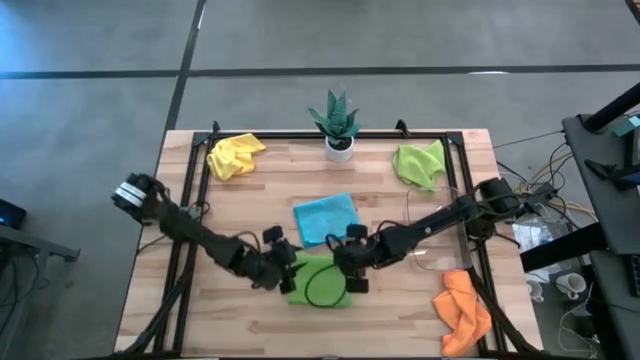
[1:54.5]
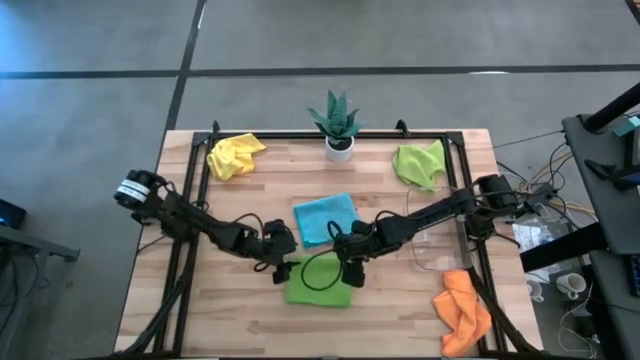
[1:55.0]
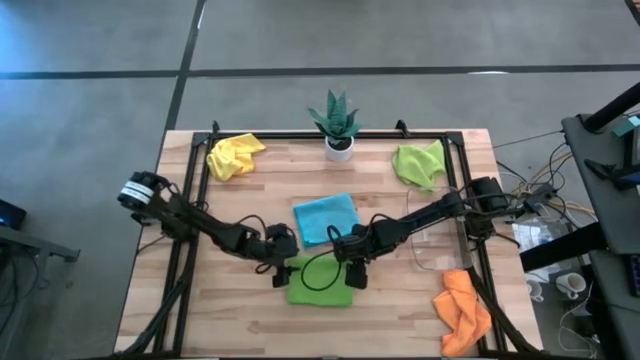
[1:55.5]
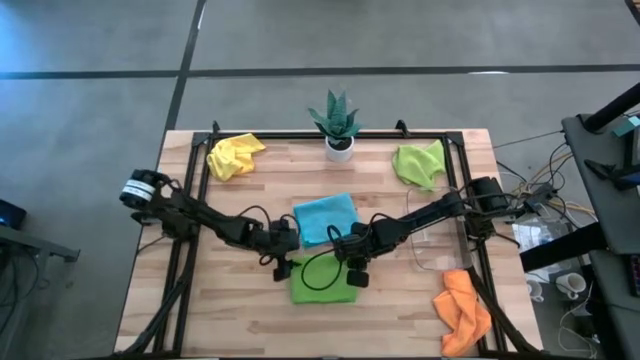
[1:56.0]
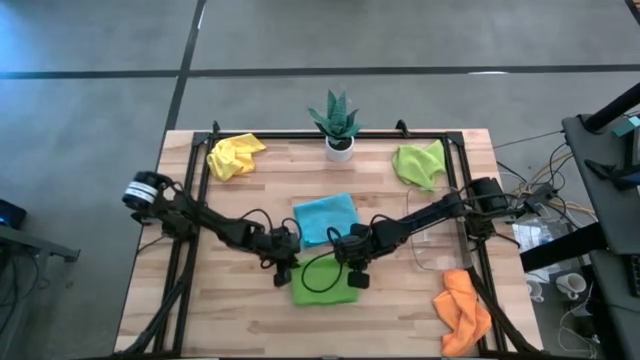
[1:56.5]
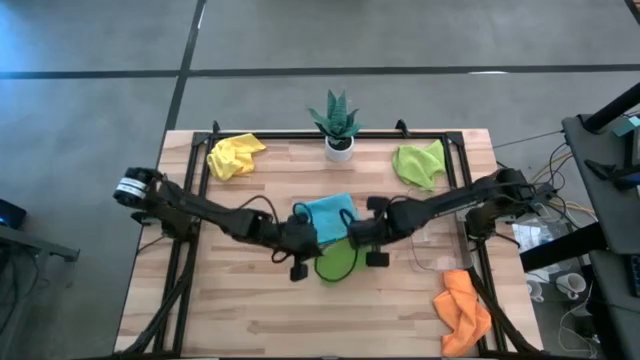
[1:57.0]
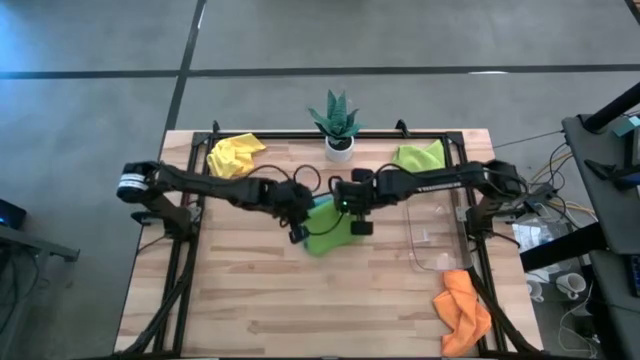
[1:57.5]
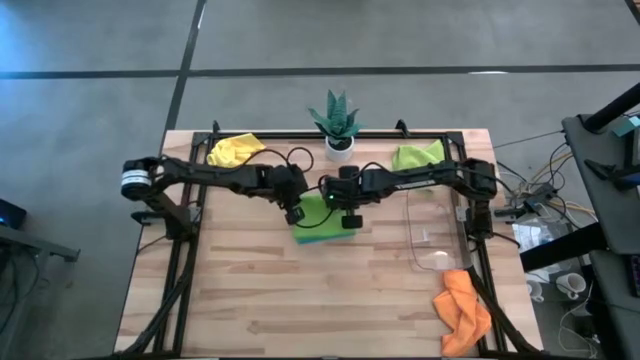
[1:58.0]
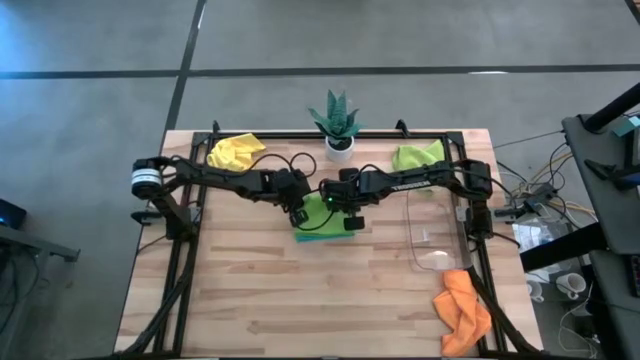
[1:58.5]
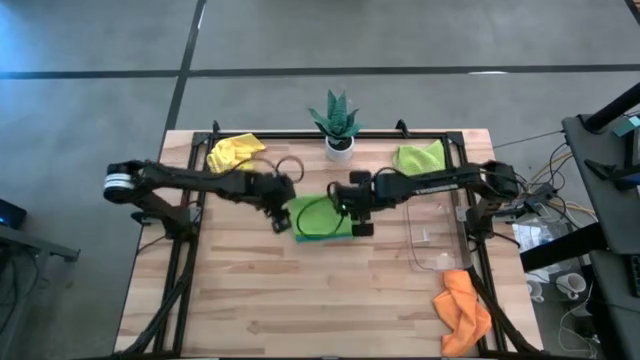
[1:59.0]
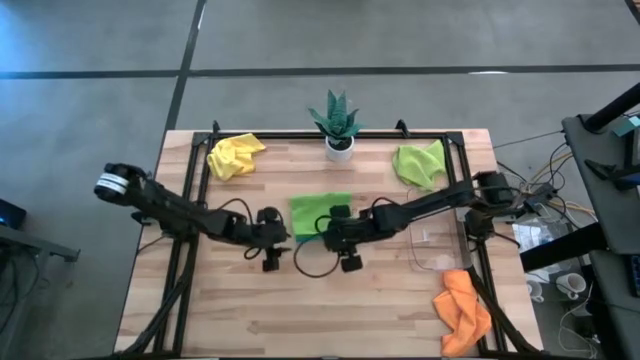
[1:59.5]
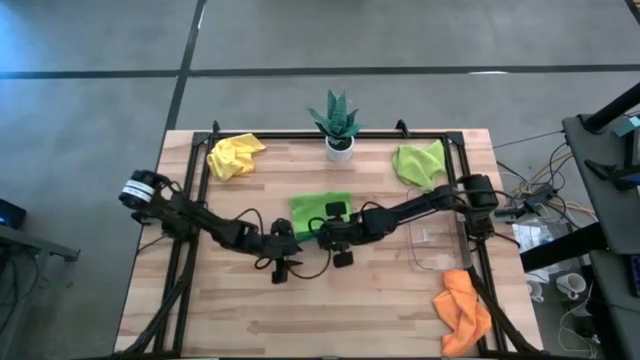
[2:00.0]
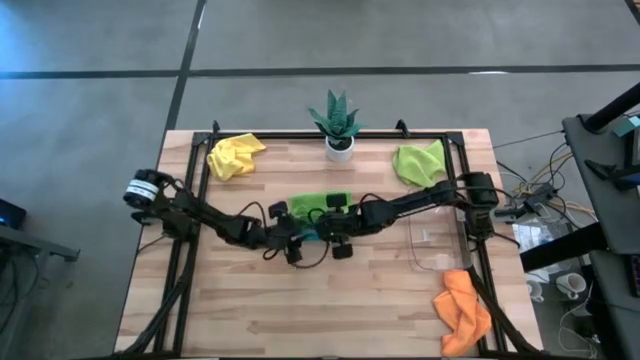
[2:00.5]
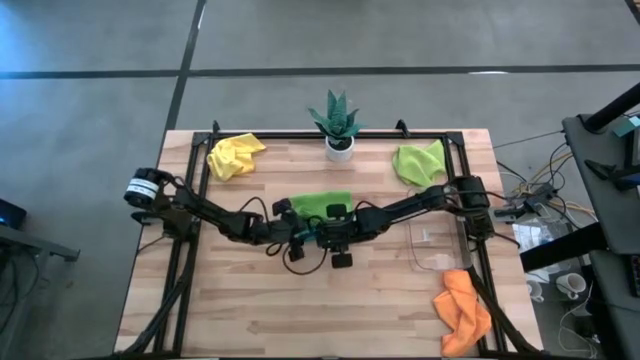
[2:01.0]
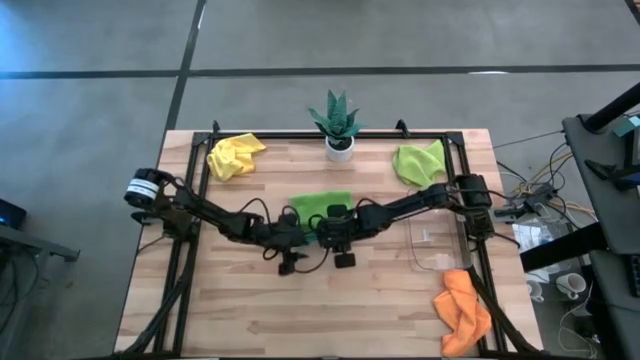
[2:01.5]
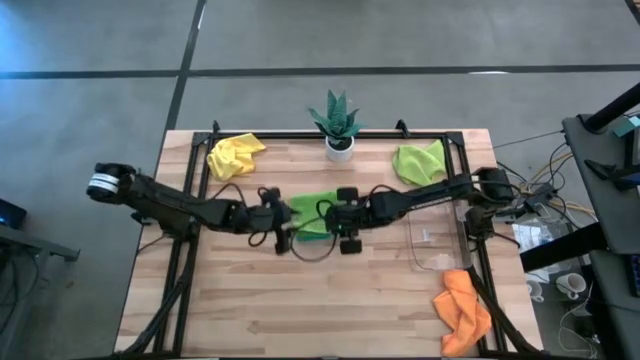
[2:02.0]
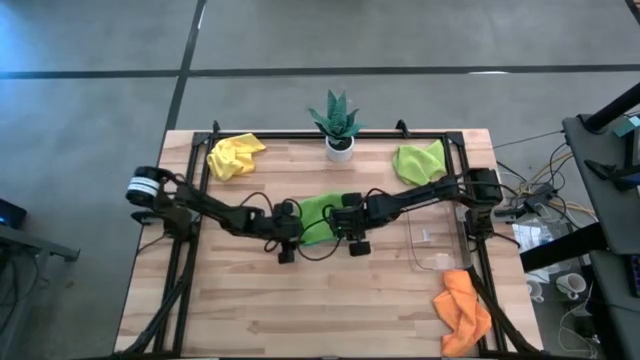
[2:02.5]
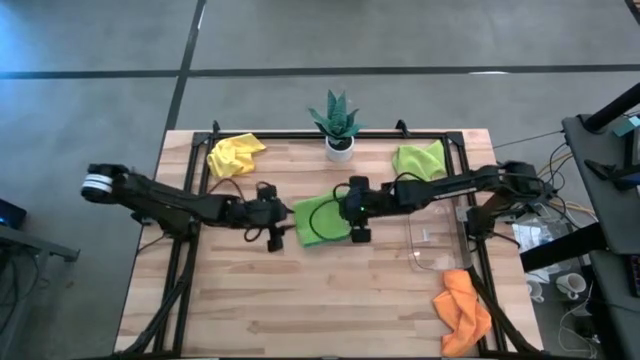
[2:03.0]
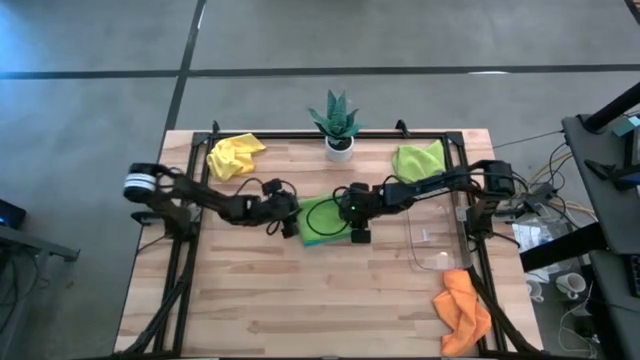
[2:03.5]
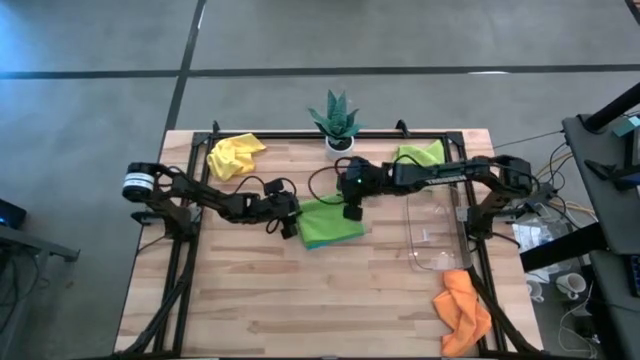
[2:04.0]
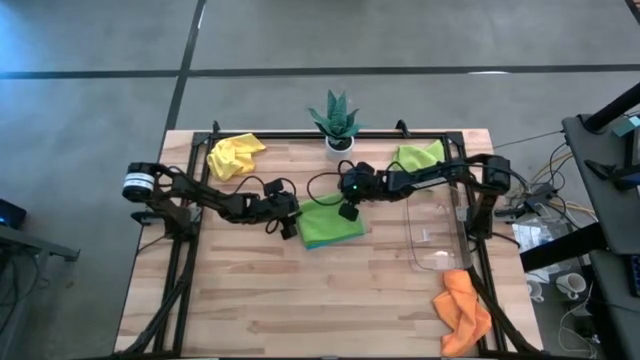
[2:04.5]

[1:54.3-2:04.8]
Task: Fold microfiber towels
Stack the green towel on top of the blue towel

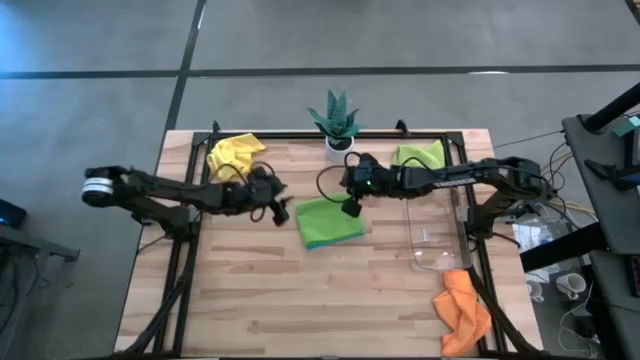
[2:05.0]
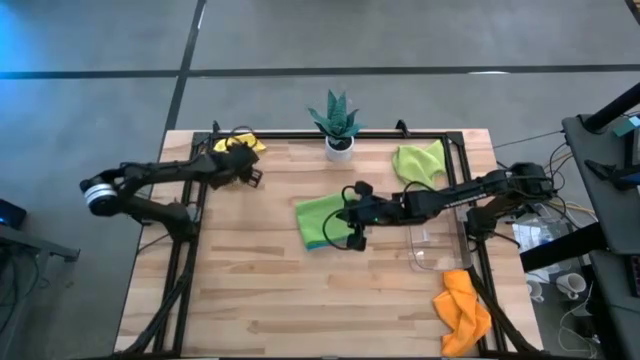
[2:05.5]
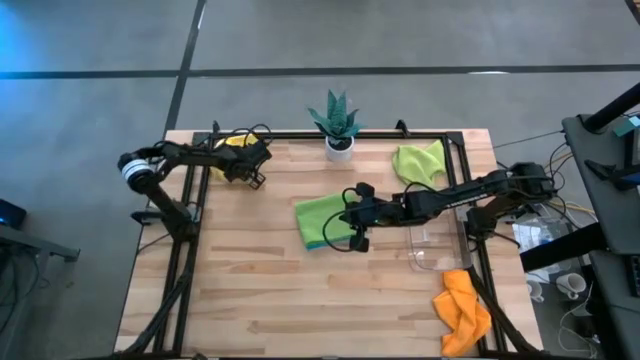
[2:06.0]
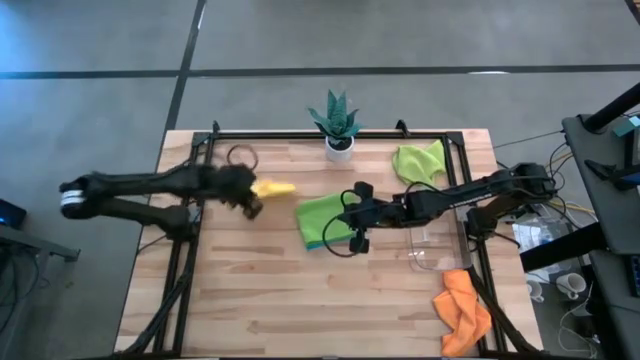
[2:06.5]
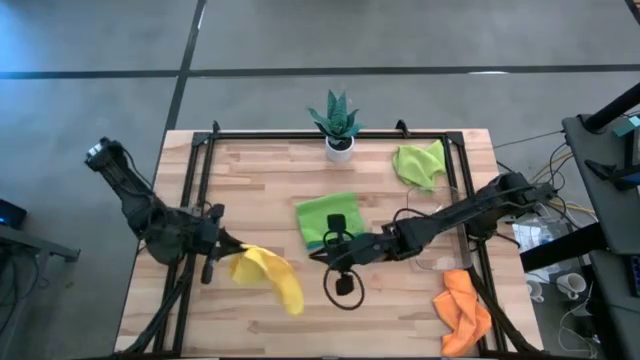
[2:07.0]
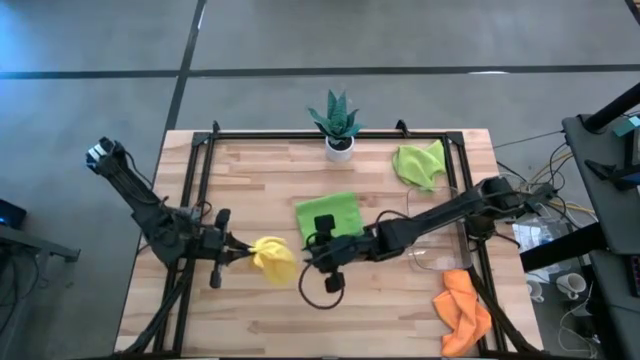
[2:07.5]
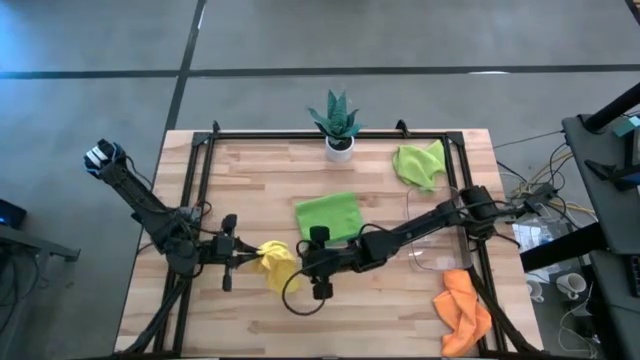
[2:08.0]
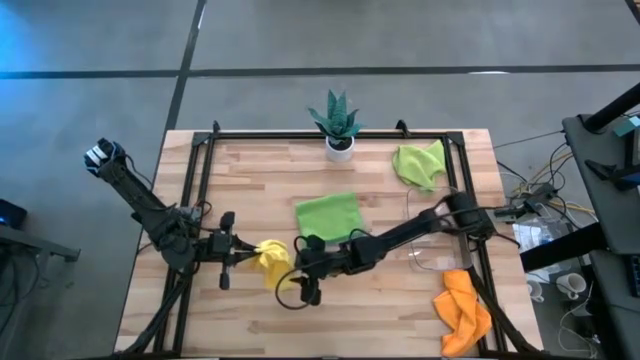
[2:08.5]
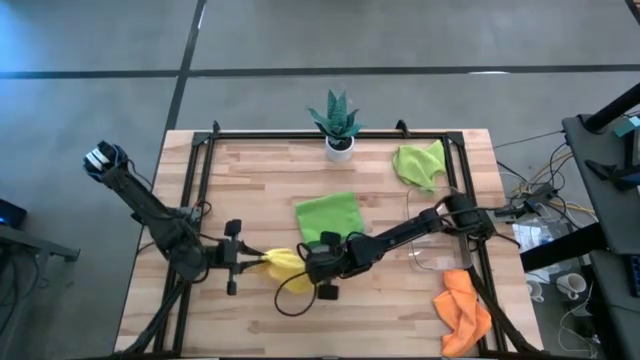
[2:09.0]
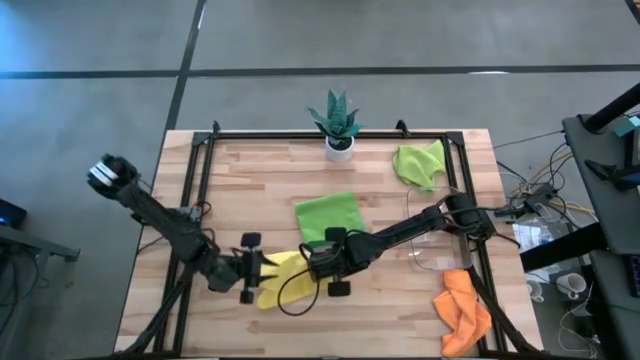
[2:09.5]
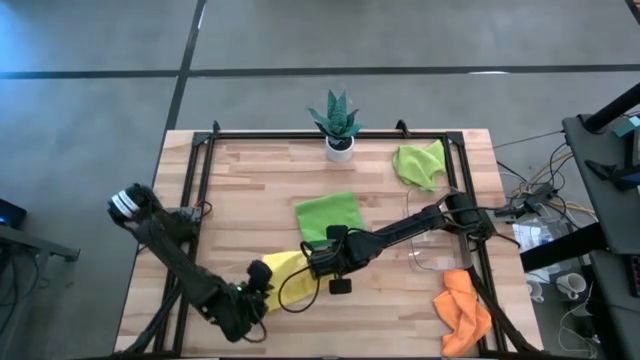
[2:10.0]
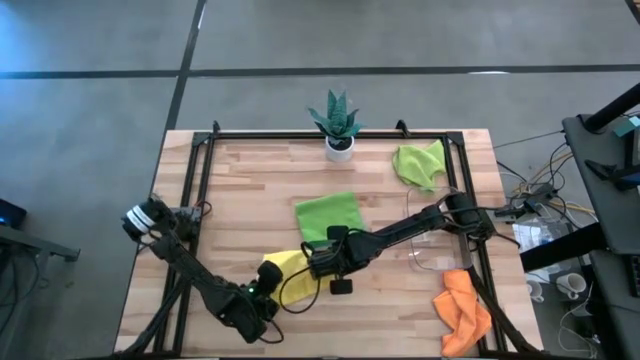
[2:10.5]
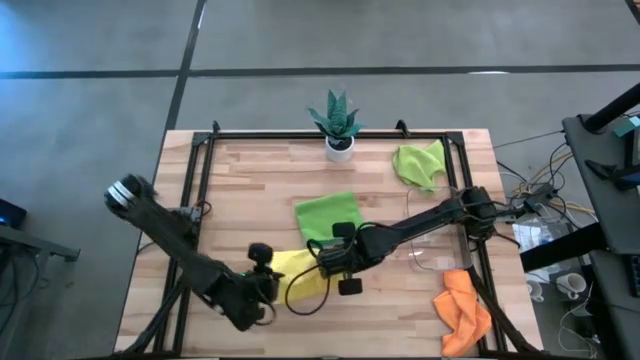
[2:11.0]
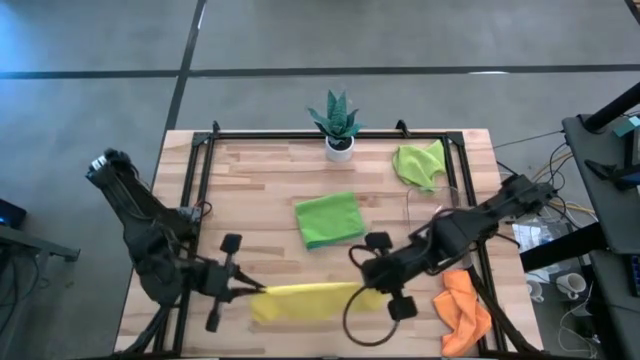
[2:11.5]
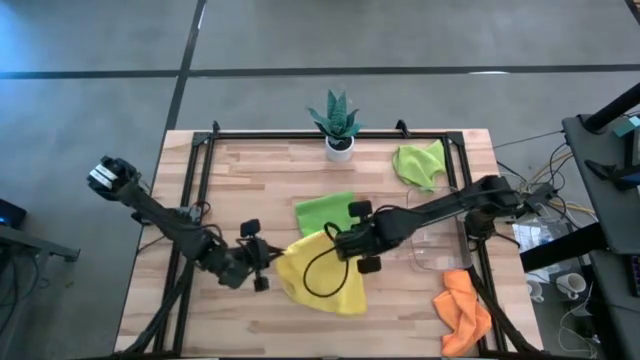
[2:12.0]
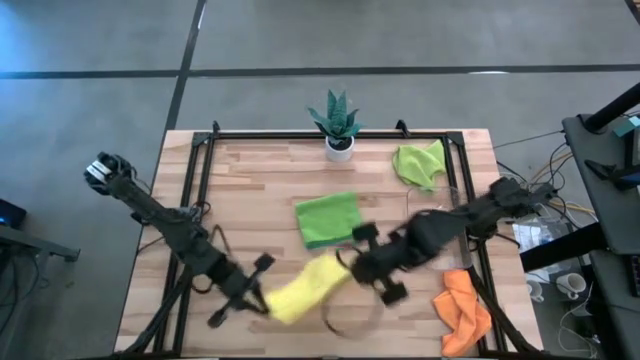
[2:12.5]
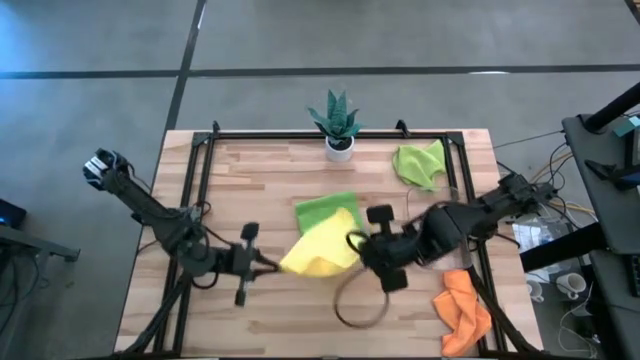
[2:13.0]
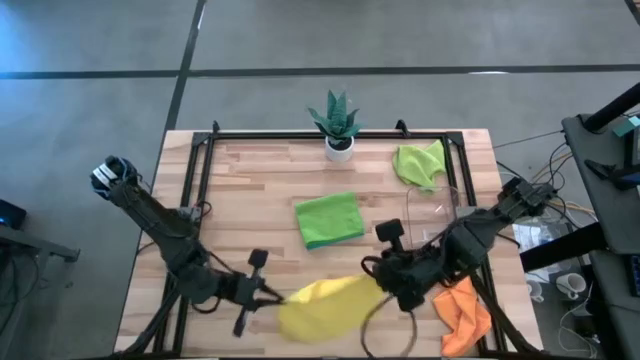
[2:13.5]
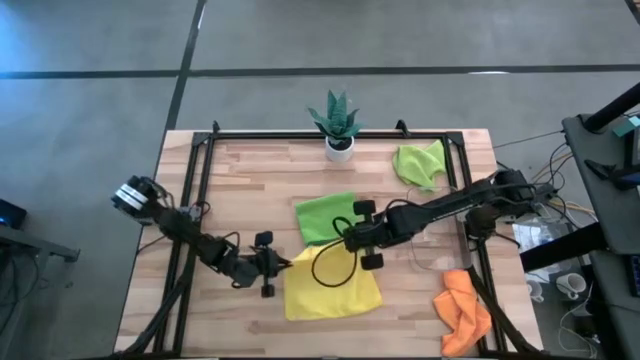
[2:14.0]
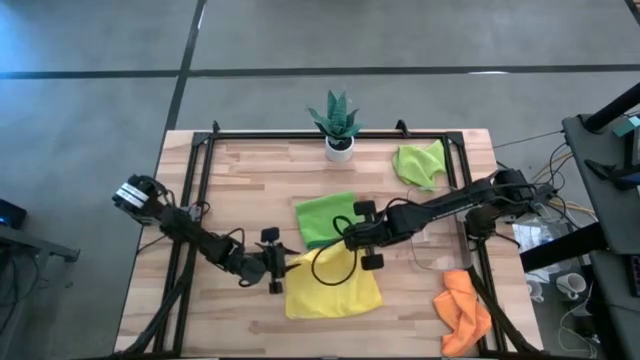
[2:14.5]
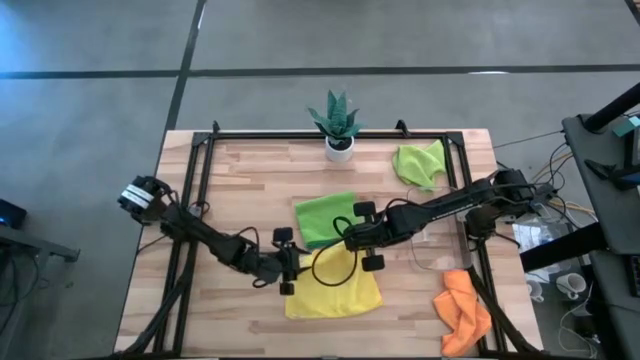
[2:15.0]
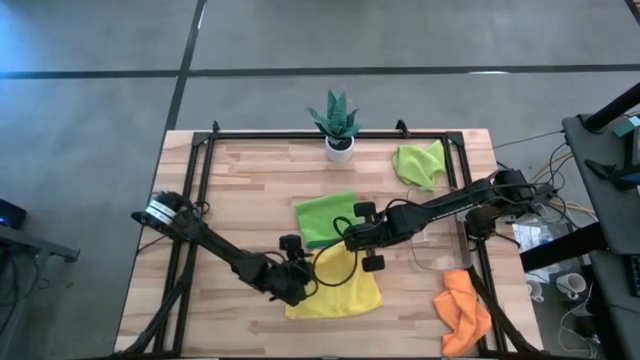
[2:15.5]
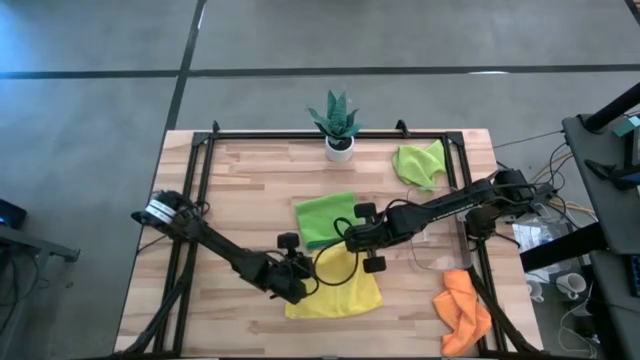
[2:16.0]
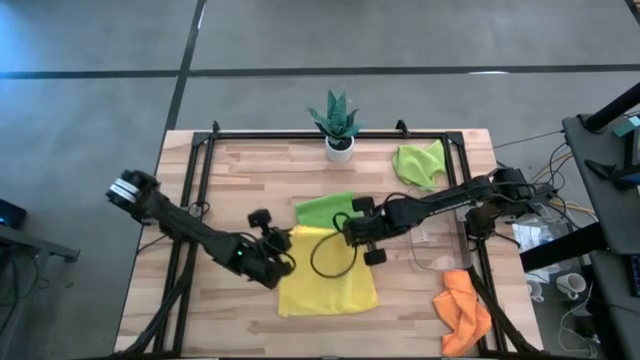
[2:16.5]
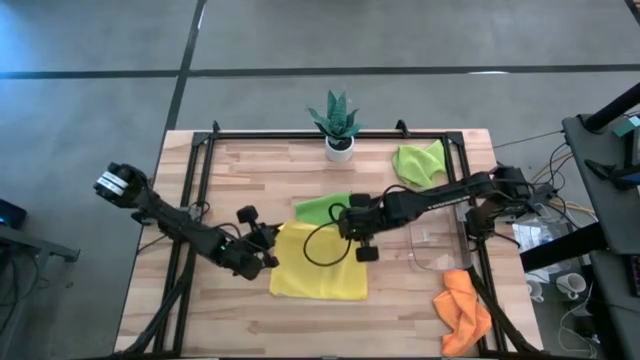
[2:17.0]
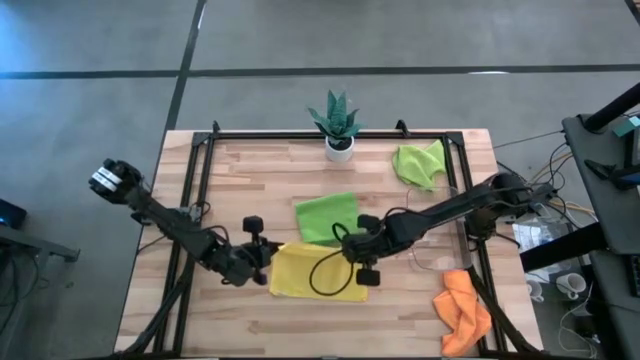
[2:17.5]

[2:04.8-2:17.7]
Fold the yellow towel on the table
